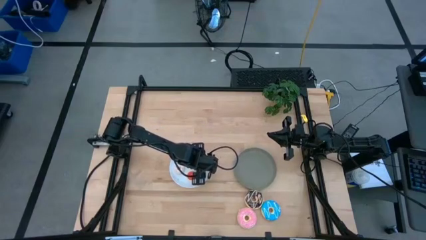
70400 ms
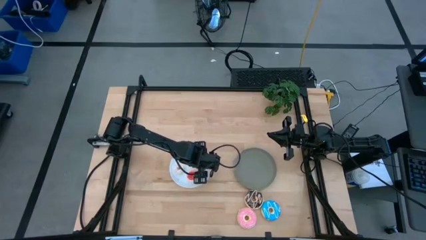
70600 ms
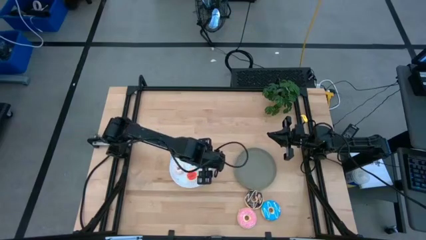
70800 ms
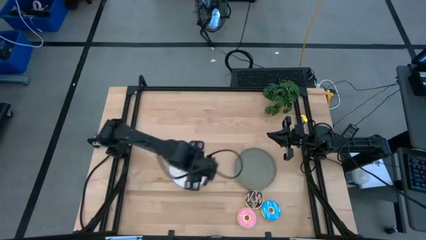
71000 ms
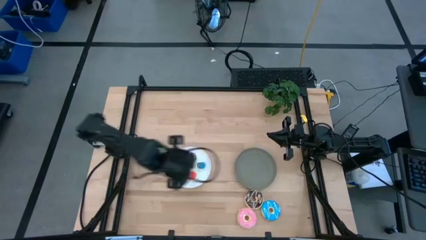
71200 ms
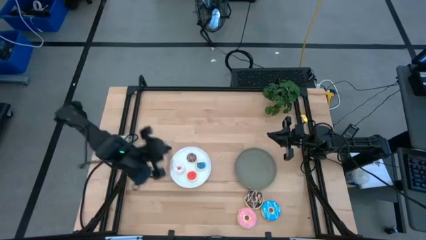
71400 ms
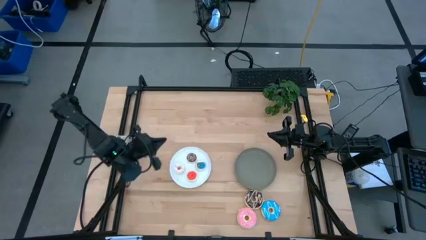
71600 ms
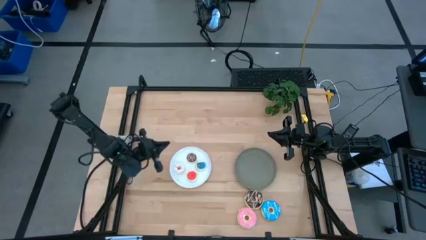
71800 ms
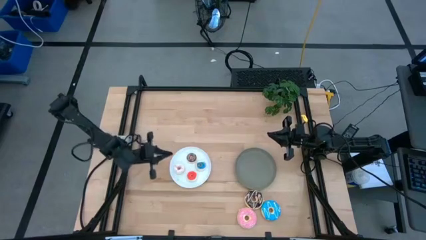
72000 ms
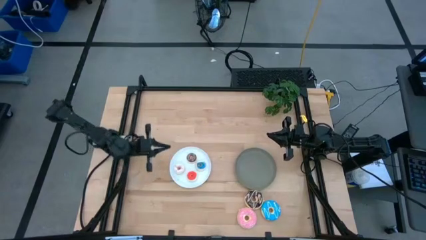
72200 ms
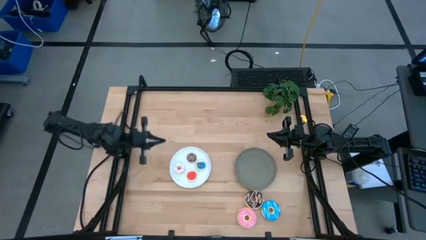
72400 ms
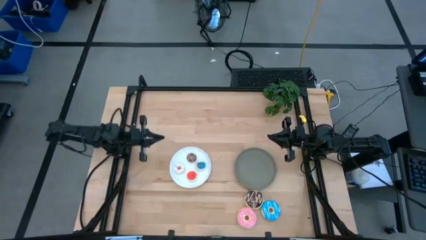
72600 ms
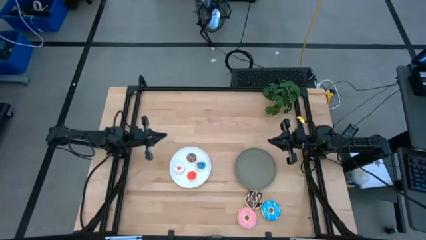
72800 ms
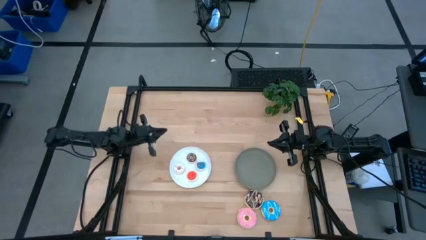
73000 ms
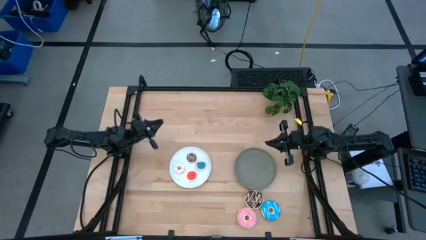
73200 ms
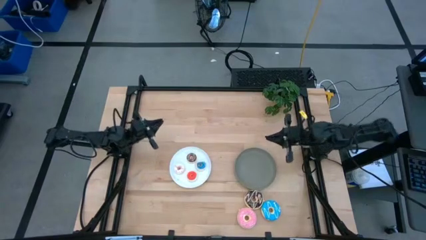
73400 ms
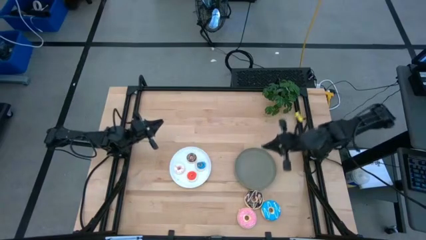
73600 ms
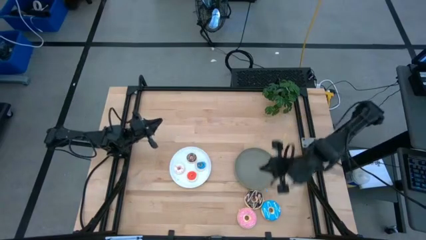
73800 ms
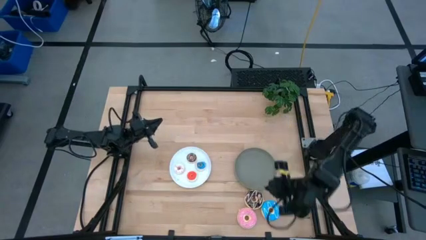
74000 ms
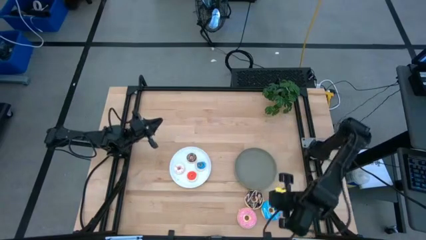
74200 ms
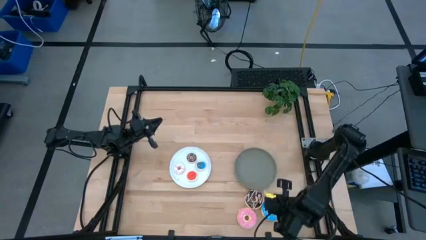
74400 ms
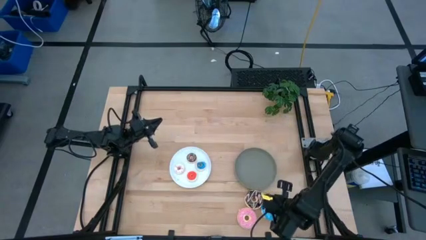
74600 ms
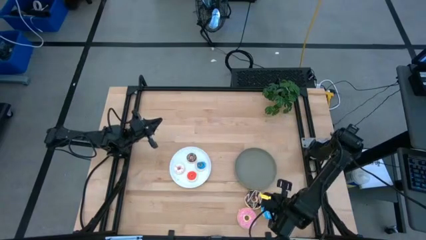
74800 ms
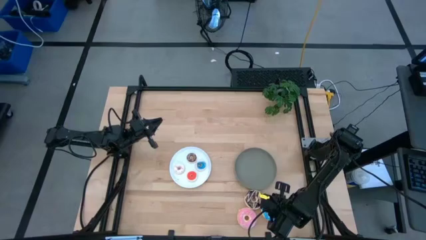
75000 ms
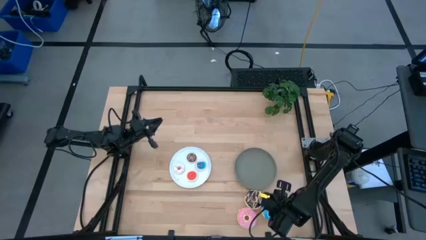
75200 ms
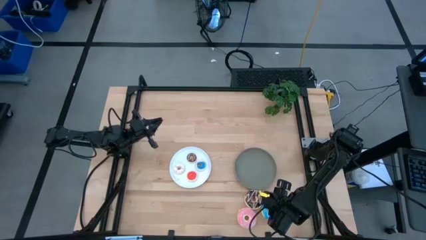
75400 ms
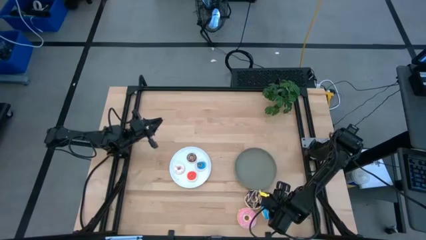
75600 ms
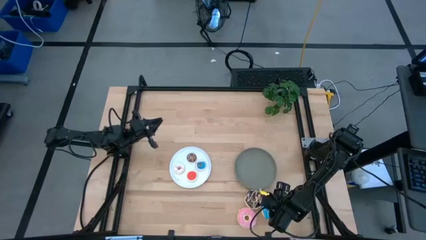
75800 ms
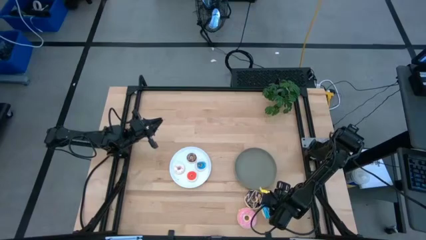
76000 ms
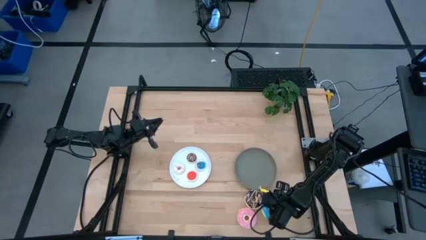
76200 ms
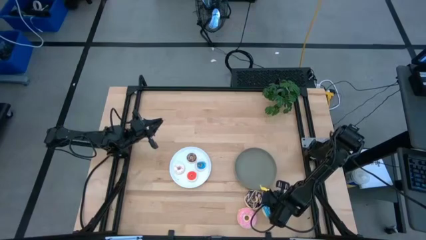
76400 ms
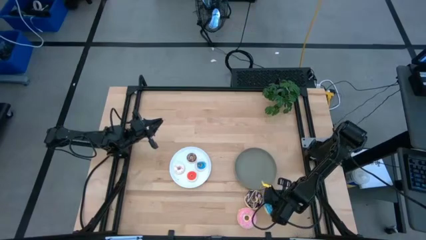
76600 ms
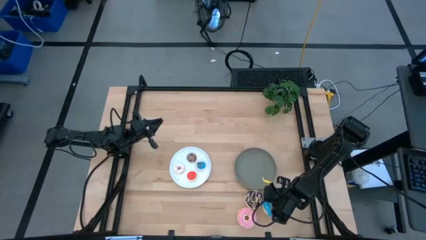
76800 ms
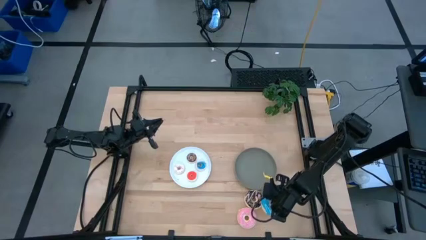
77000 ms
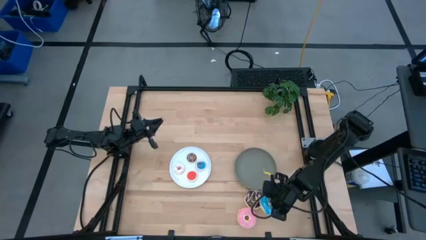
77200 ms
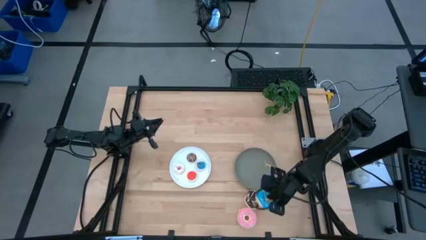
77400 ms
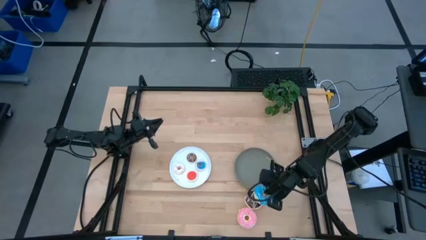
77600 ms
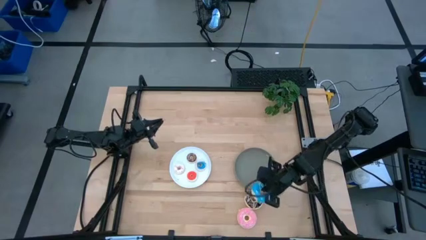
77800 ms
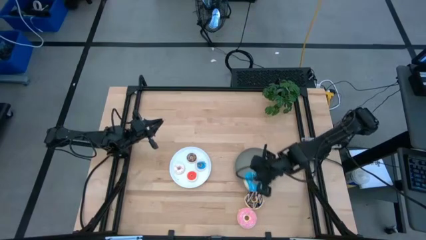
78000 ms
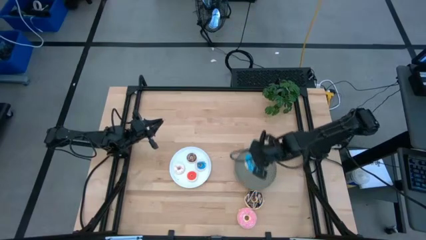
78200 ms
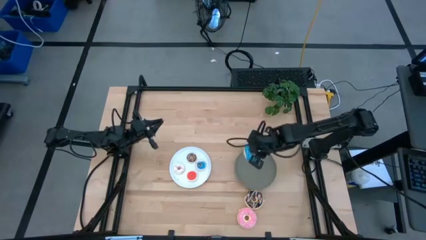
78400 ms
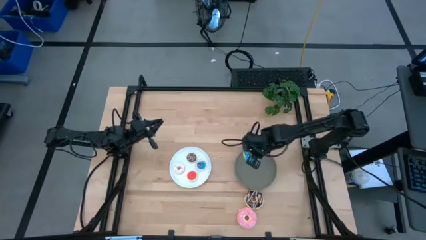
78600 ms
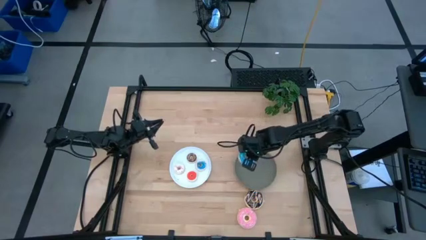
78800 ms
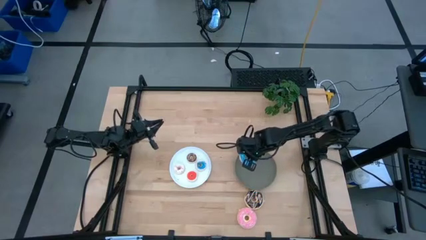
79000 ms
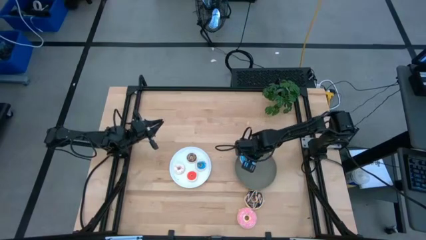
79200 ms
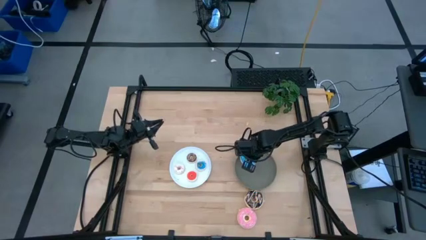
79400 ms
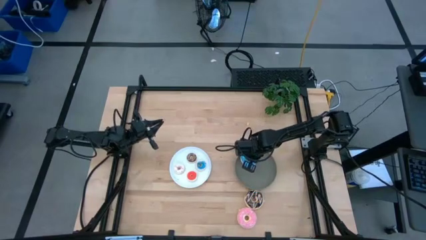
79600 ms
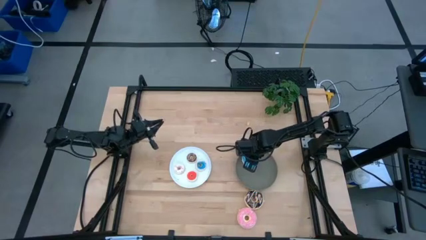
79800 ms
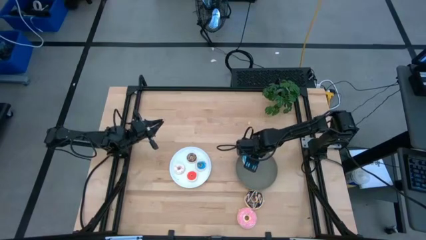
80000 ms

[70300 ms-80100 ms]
Task: Pick & Place donuts
Put the large blue donut on the gray plate

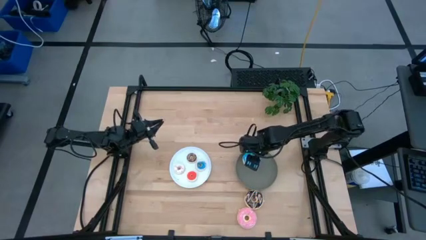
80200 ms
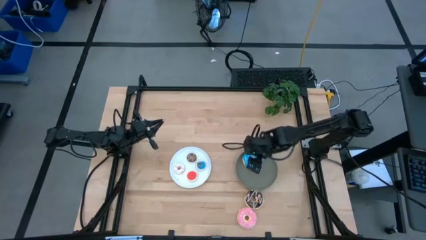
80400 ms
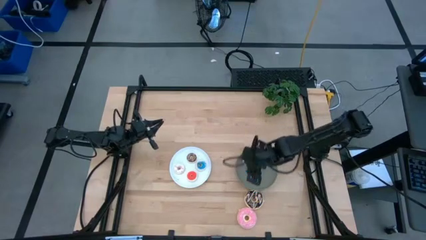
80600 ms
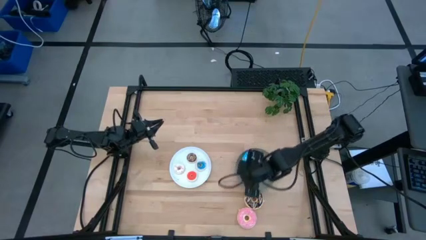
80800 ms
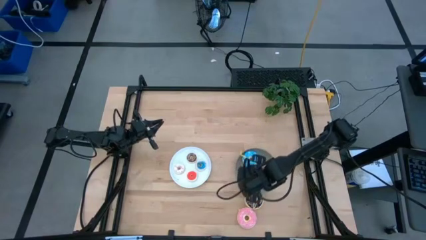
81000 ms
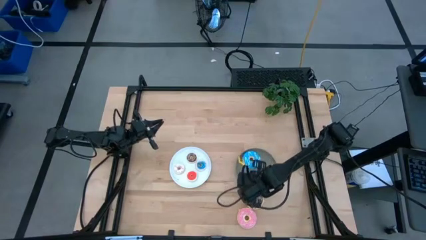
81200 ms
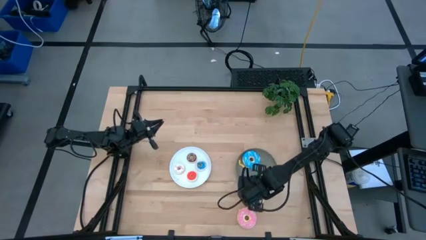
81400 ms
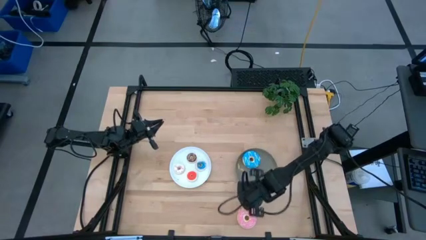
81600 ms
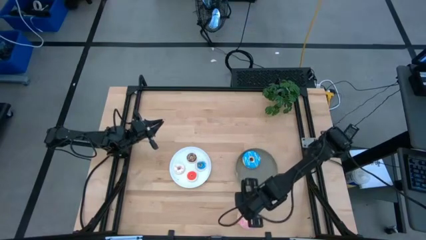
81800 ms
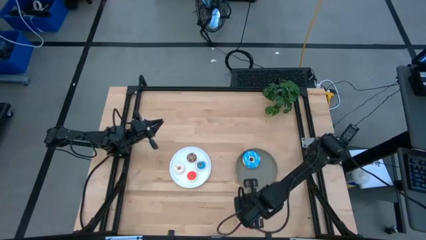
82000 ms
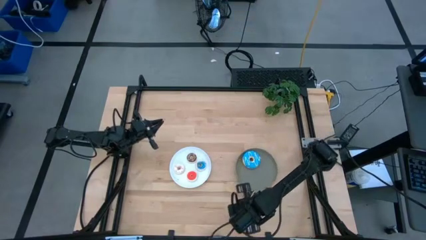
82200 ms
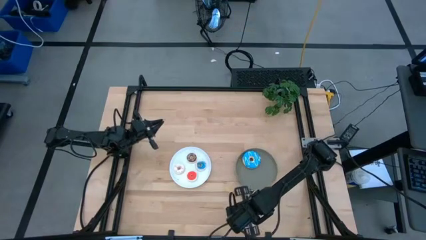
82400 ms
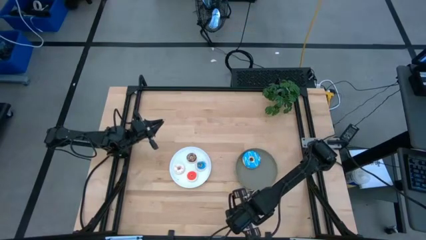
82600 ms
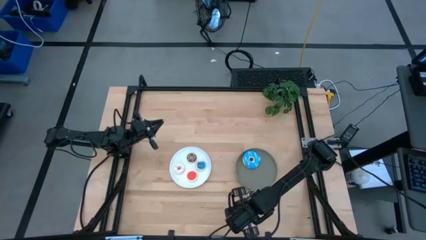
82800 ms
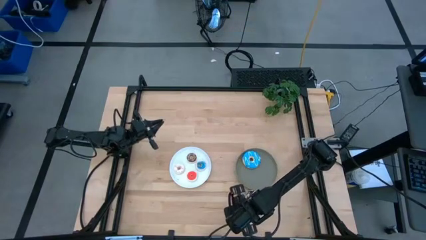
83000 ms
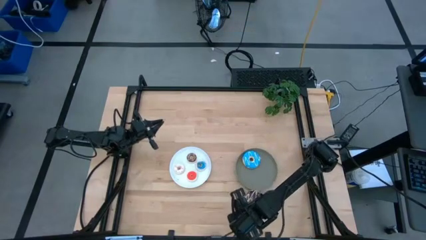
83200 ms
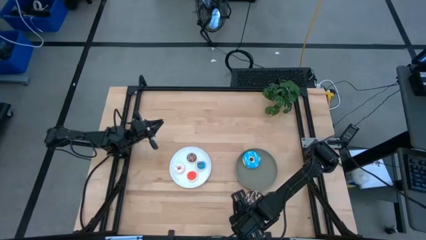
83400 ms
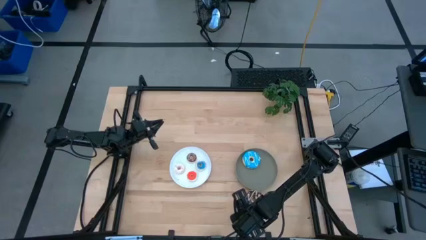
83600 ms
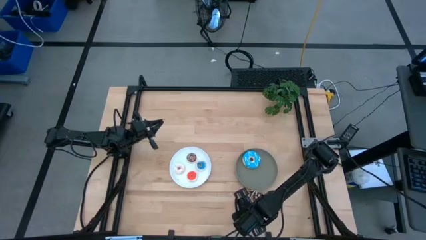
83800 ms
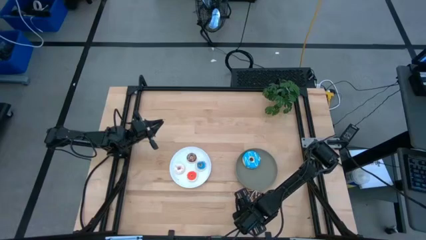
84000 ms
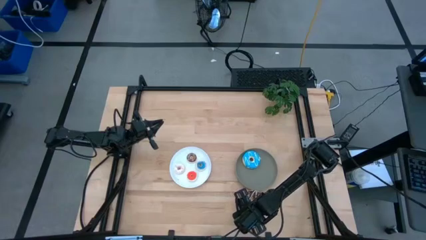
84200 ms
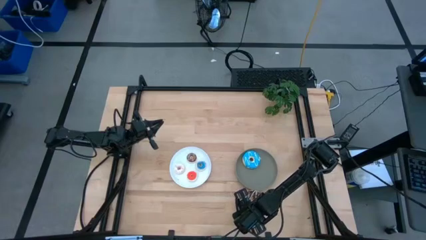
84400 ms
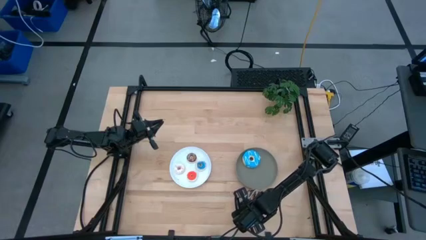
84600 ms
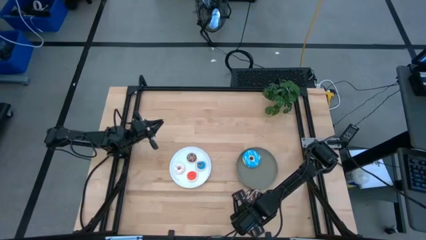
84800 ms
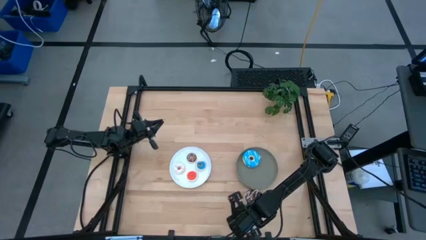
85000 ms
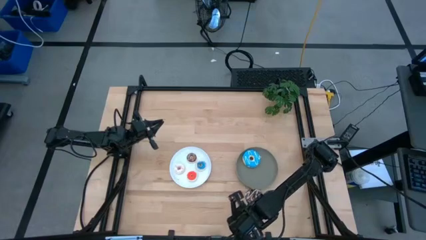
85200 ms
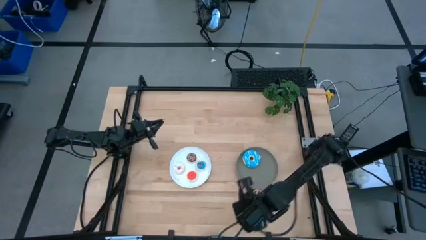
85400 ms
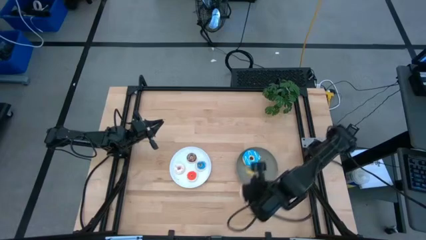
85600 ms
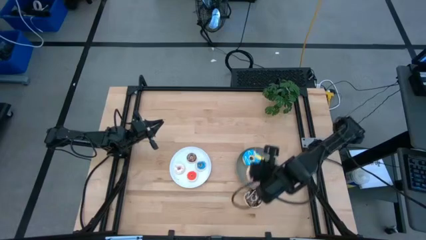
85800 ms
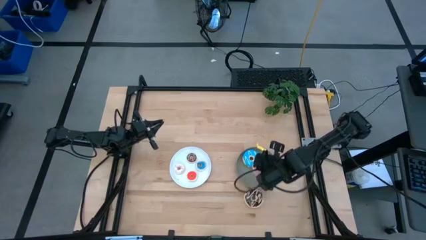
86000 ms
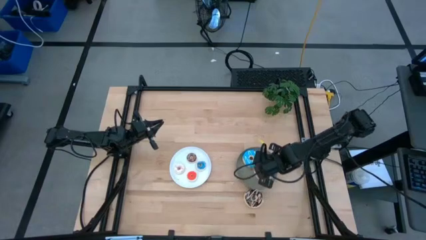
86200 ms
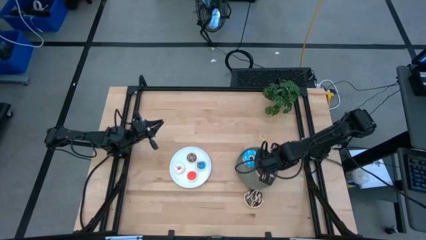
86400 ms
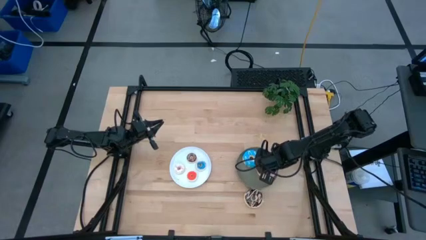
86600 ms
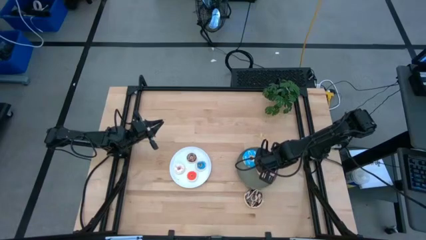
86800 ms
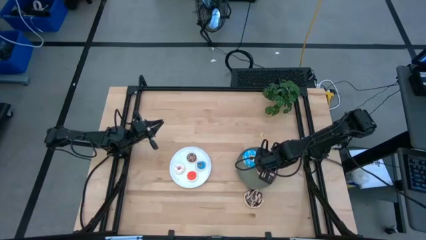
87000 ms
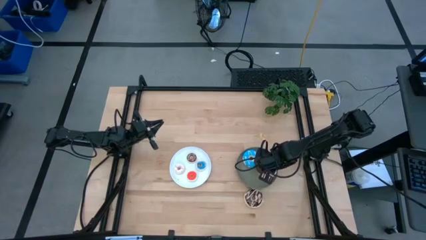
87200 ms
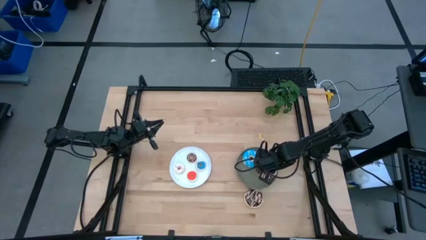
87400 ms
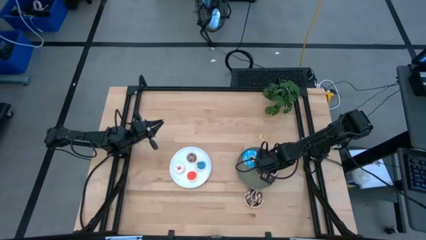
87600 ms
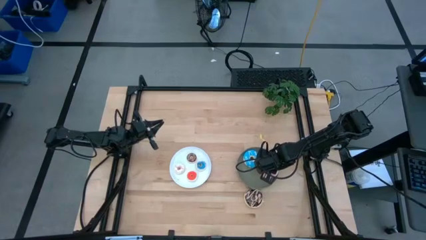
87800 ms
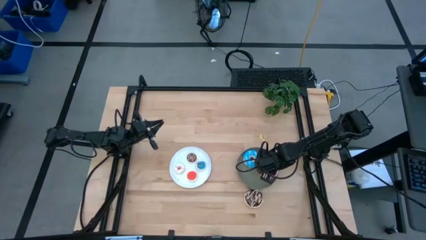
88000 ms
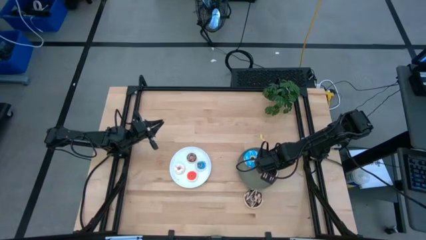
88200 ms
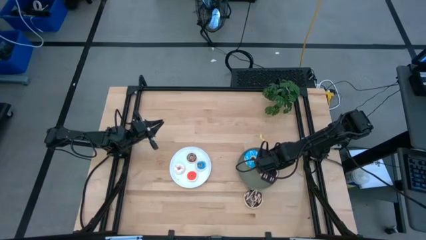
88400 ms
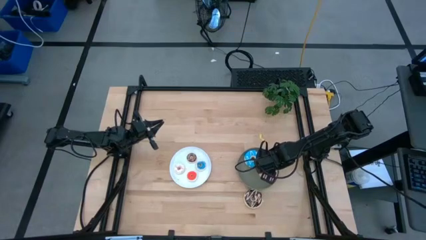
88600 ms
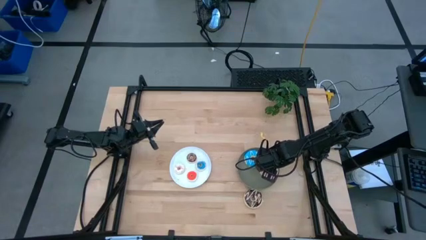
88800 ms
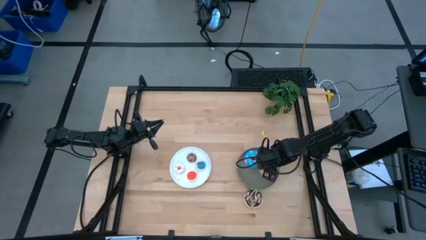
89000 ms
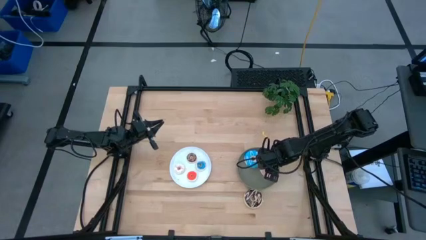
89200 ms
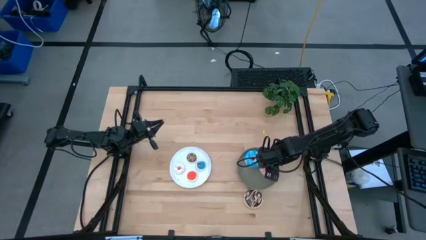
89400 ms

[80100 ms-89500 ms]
Put the large pink donut on the gray plate
